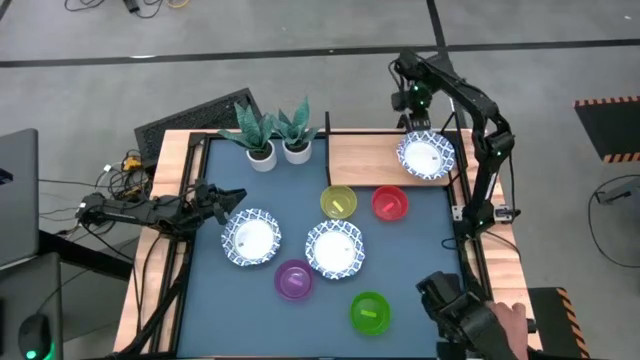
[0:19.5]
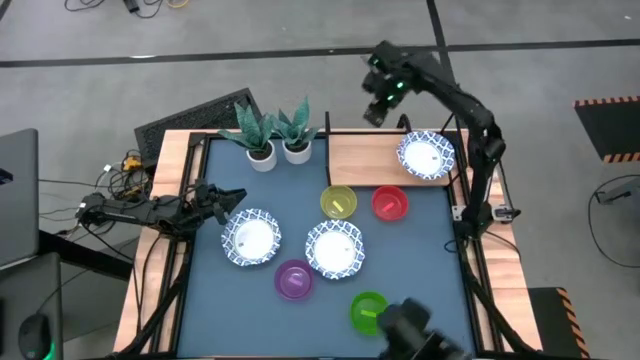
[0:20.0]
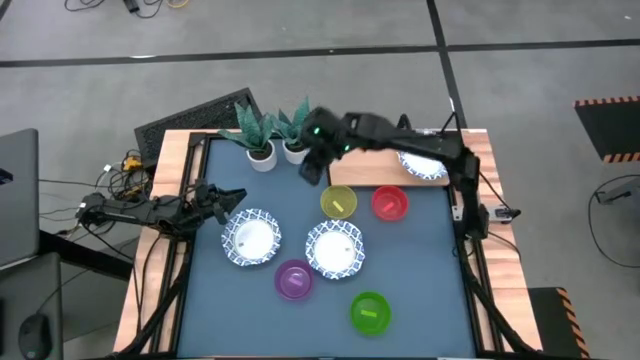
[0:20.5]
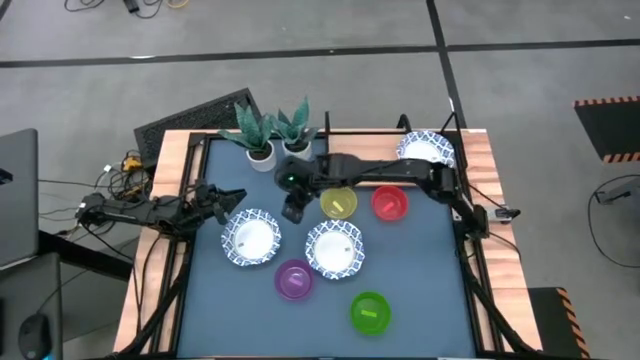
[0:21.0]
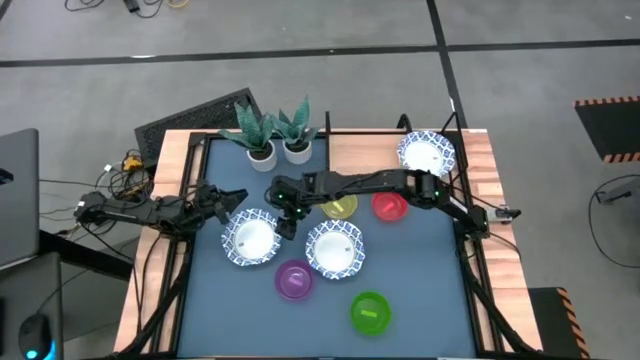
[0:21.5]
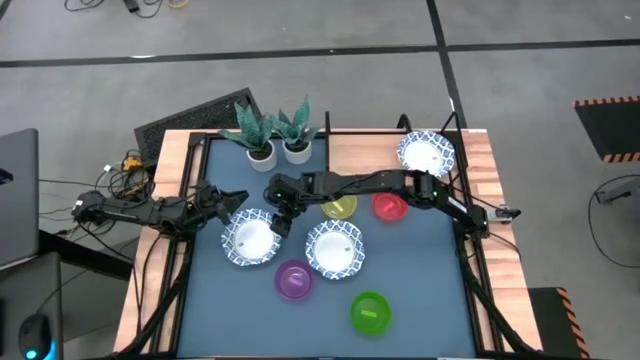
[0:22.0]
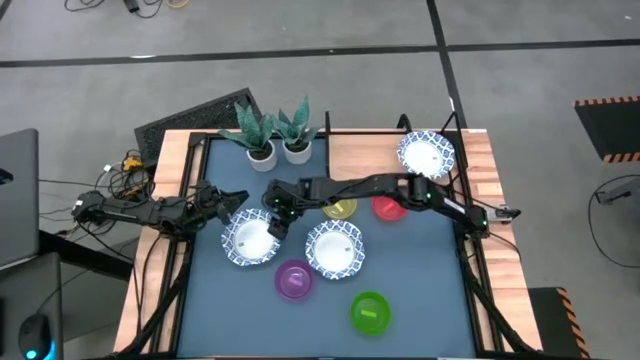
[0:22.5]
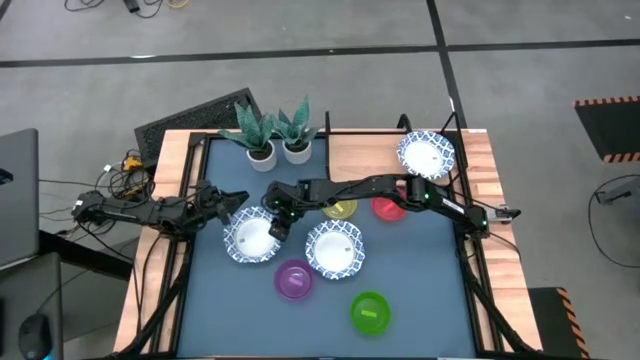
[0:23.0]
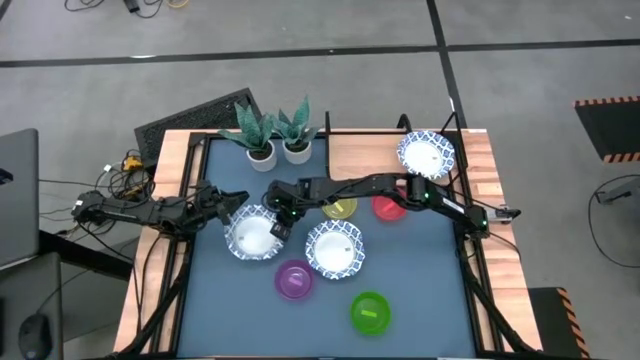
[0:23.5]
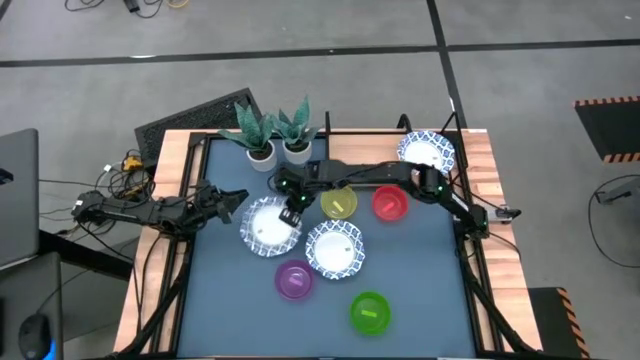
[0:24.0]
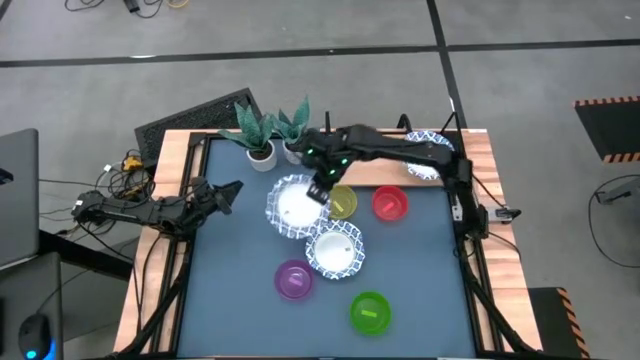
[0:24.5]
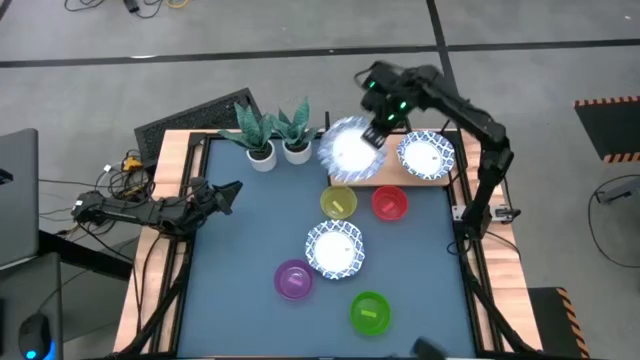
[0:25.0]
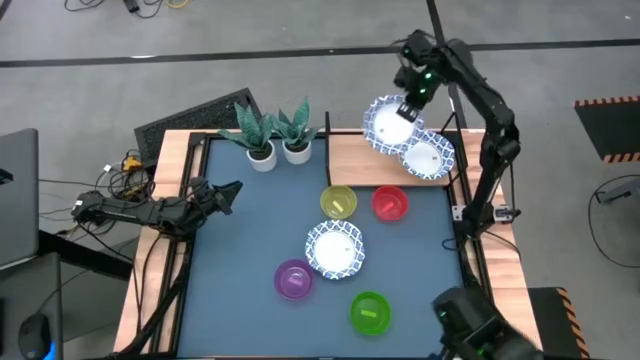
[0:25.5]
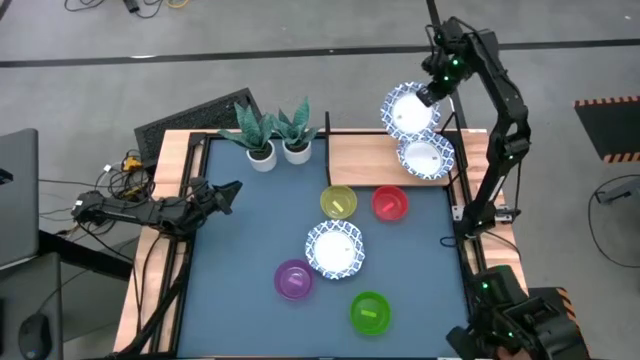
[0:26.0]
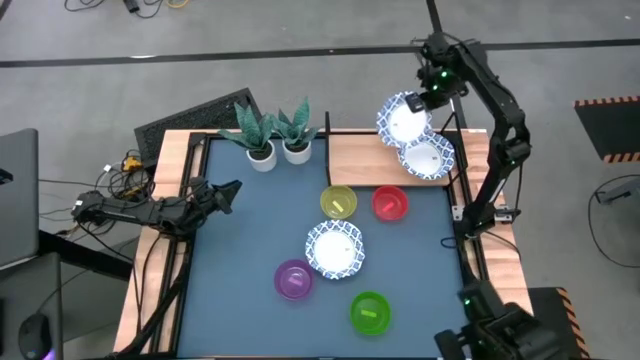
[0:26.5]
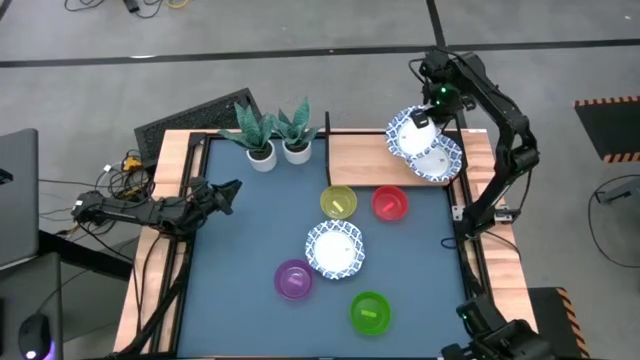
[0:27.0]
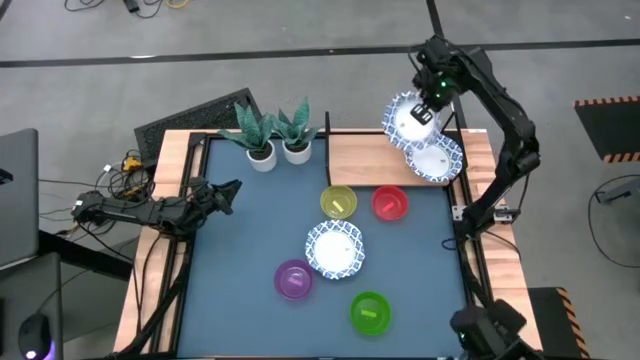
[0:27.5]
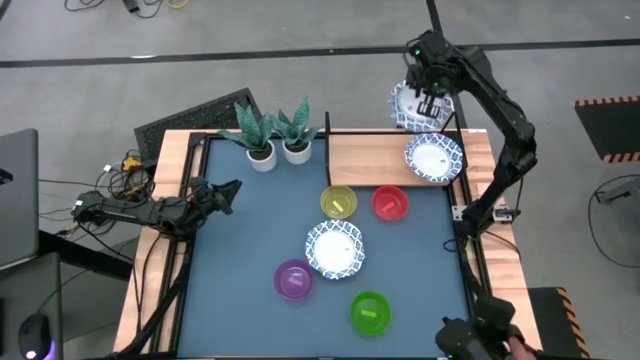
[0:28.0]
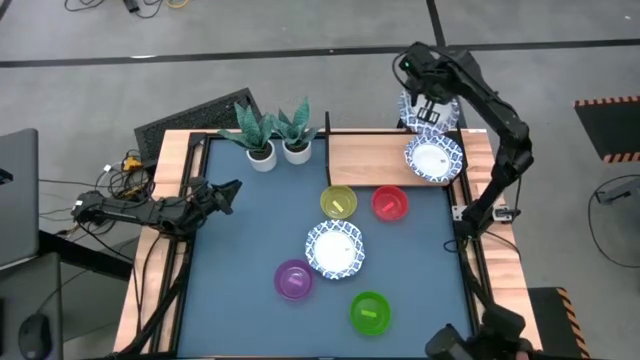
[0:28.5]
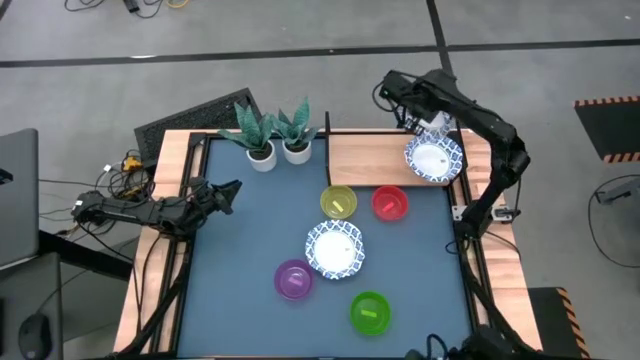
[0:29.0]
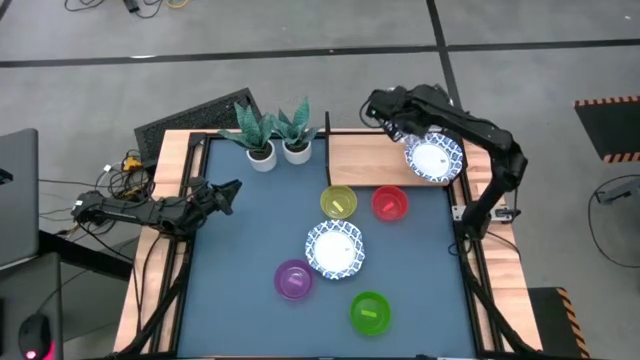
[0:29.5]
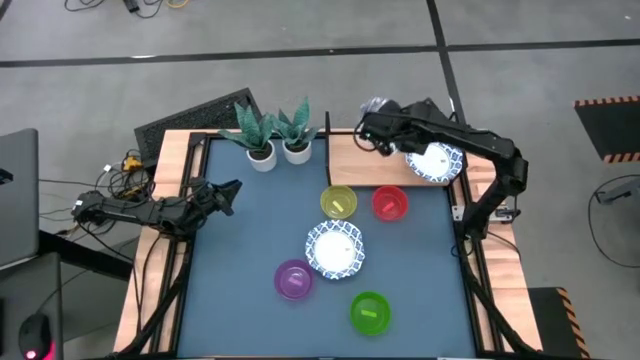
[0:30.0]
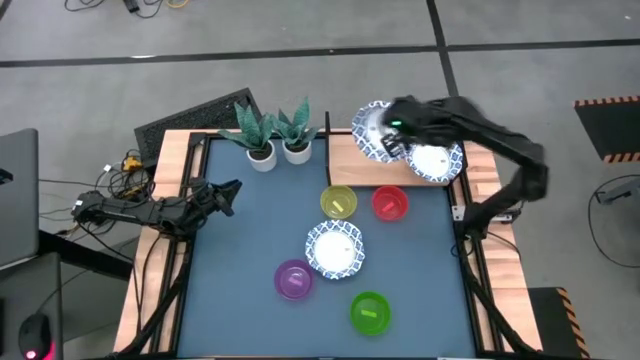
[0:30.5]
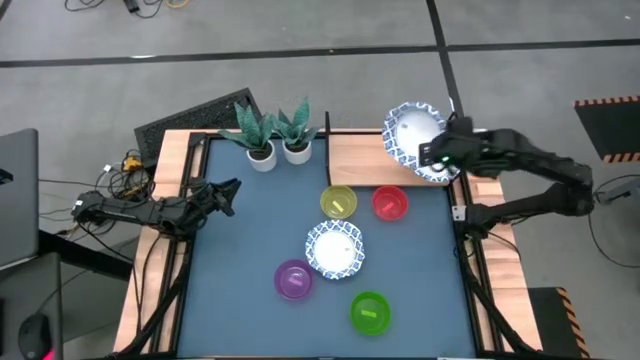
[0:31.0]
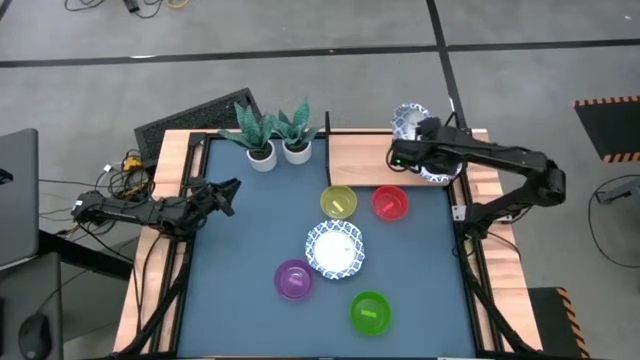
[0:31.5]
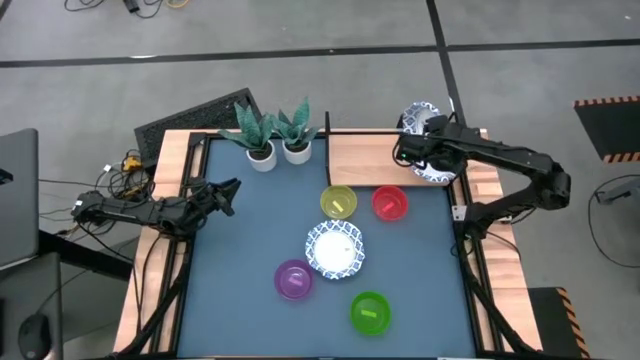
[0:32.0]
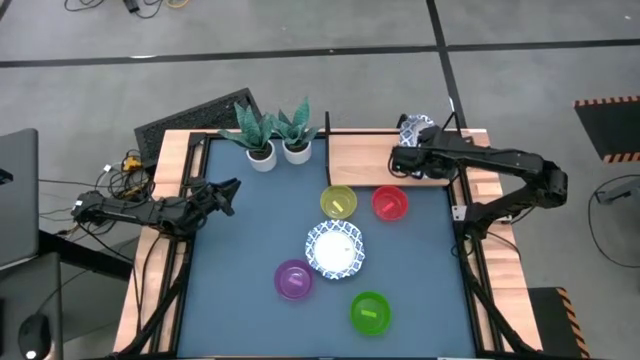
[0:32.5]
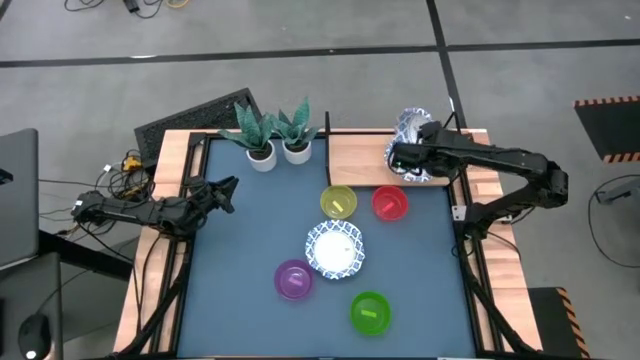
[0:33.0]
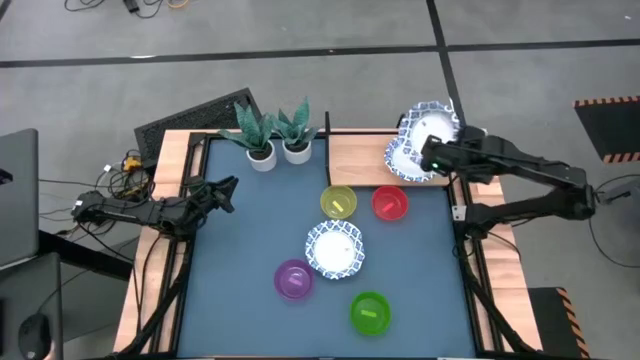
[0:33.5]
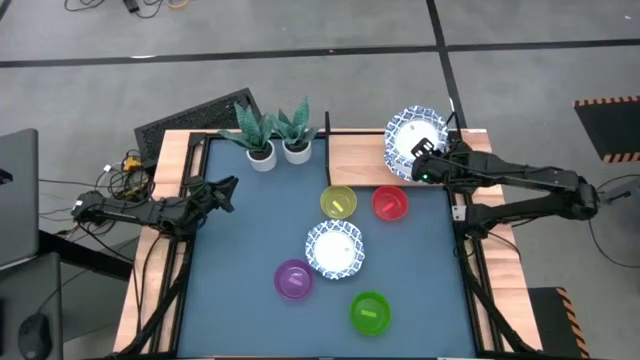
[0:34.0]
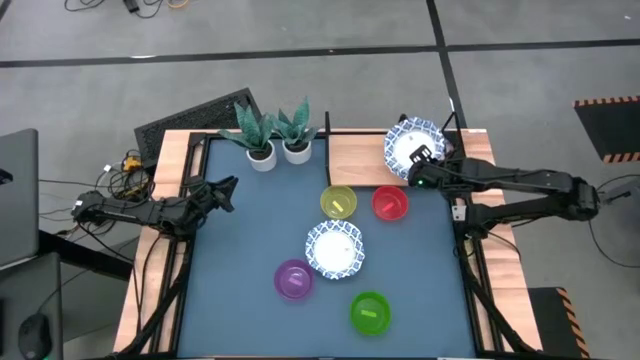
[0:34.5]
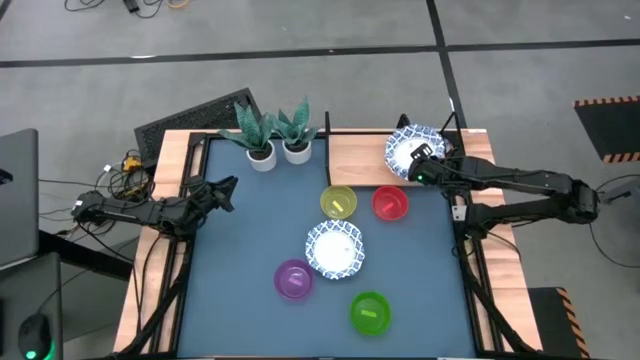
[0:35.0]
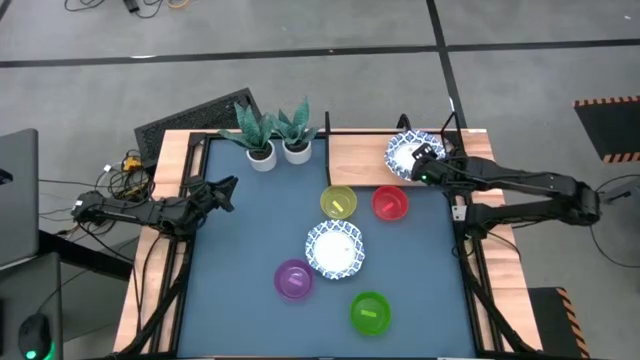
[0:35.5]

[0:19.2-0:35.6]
Task: Place and stack bowls onto a shelf
Stack the white patterned bowl on the white patterned bowl on the shelf

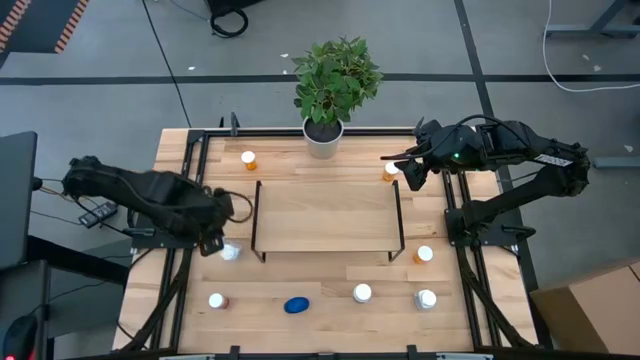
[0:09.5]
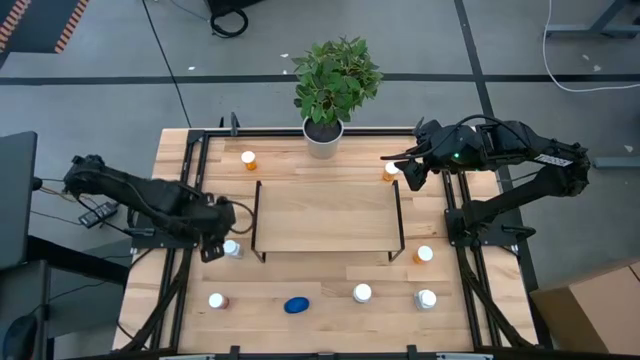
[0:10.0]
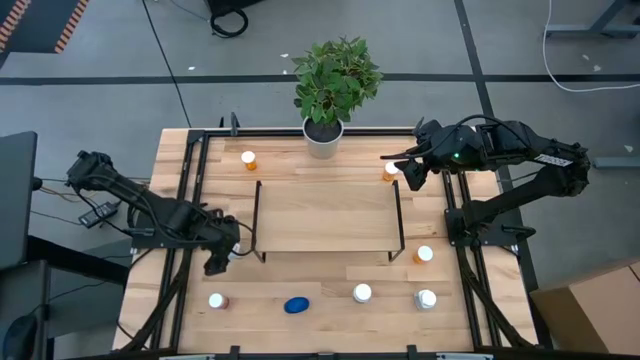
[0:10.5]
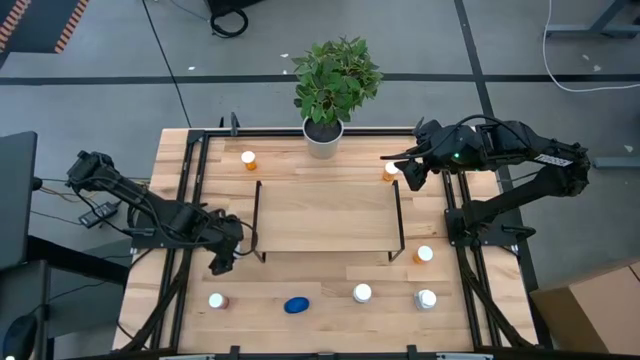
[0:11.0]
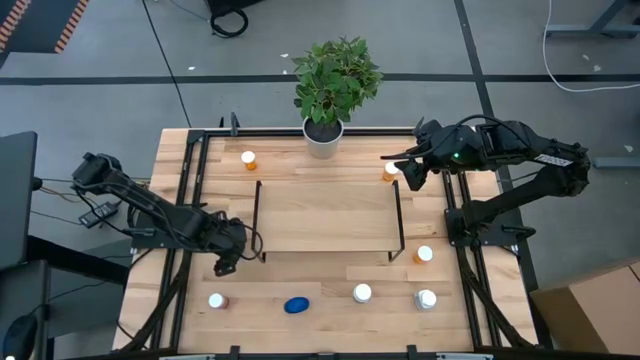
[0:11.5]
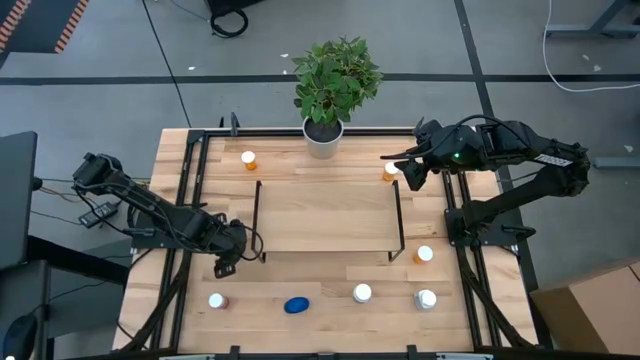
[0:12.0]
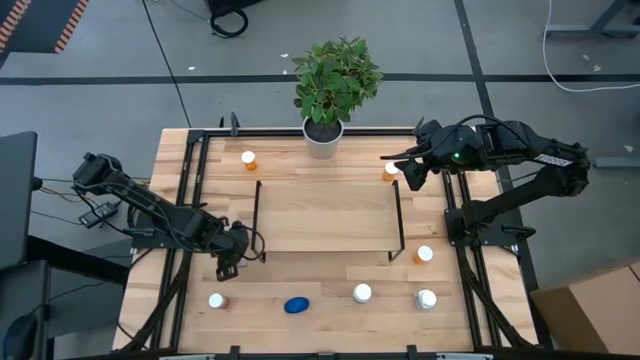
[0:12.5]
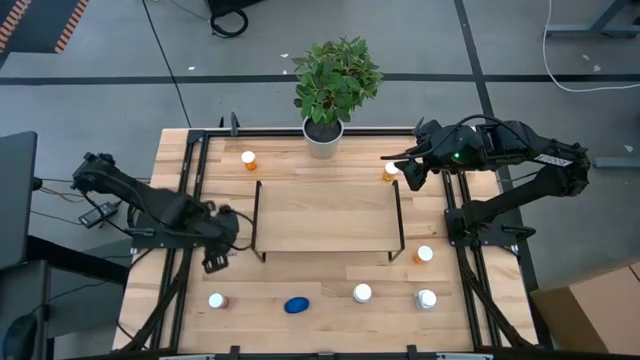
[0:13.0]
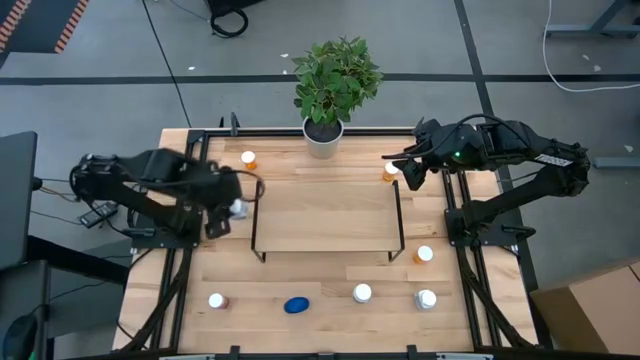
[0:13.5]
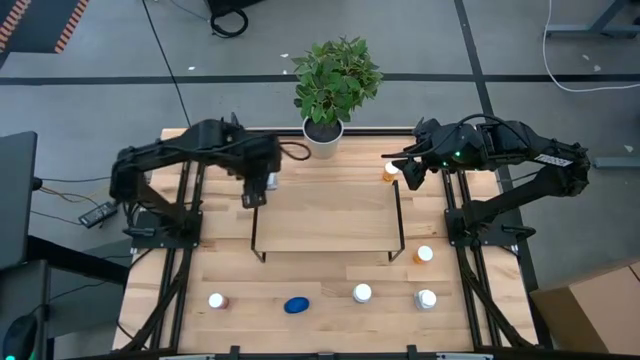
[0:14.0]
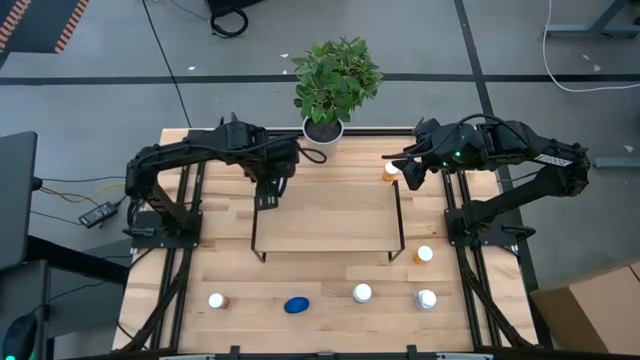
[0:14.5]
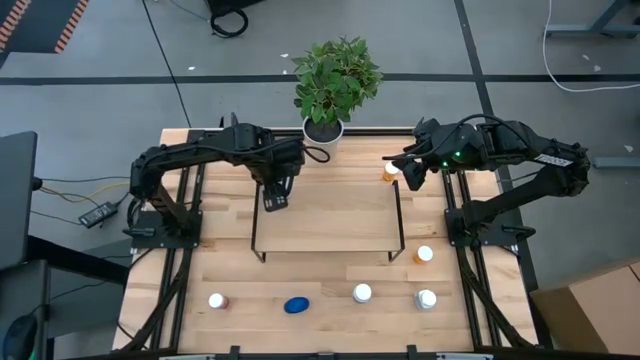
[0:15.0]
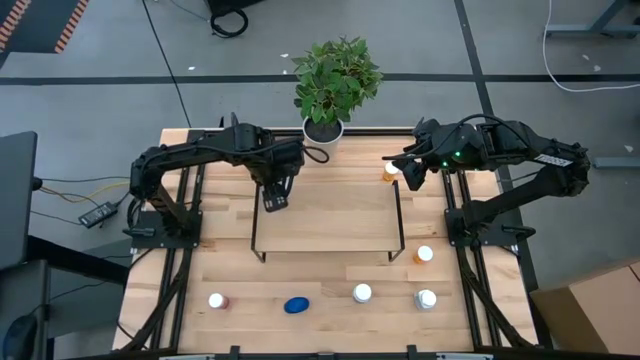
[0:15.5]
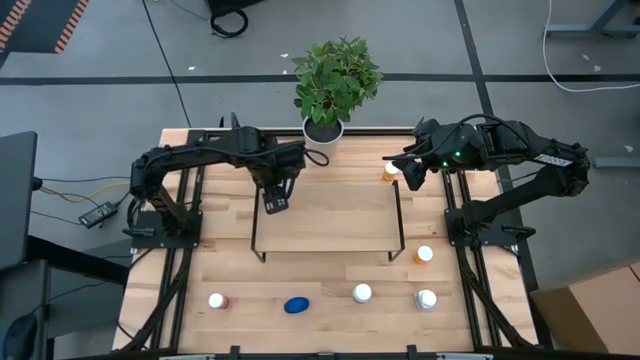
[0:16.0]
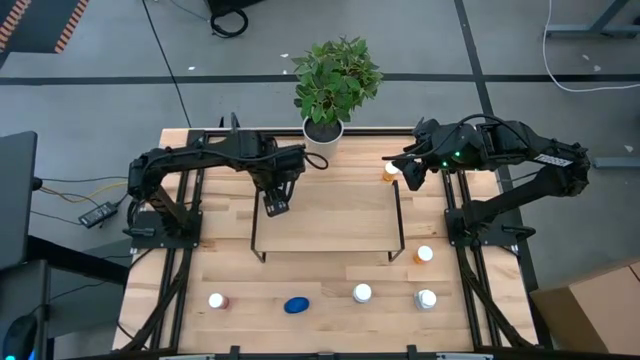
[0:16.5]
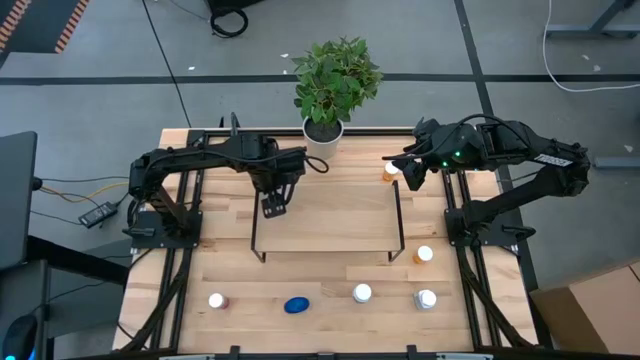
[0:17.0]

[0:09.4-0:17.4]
Task: Pick and place medicine bottles onto shelf by color
Put the top left white and blue pill bottle on the shelf
